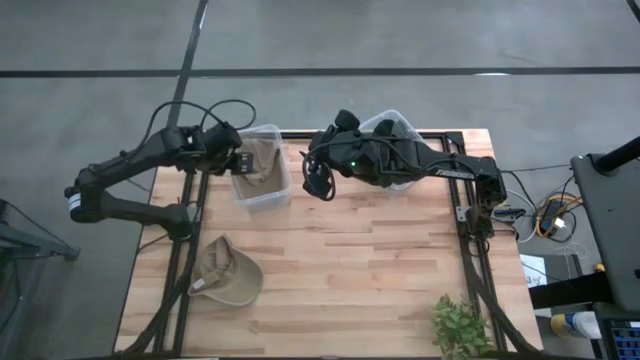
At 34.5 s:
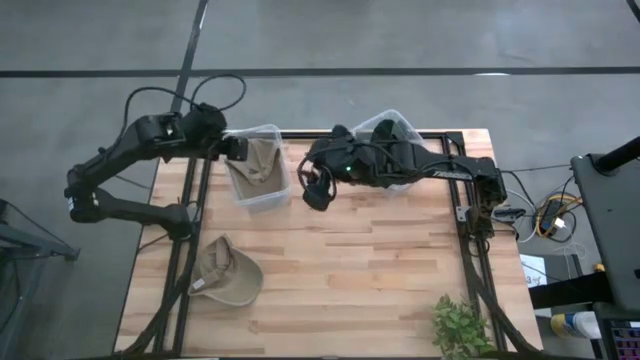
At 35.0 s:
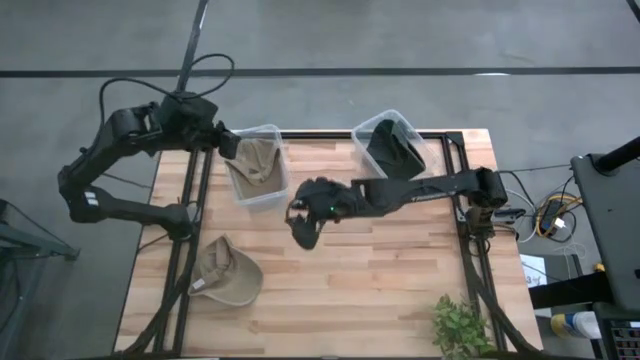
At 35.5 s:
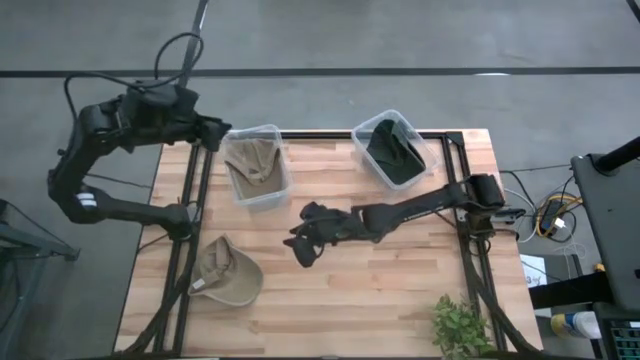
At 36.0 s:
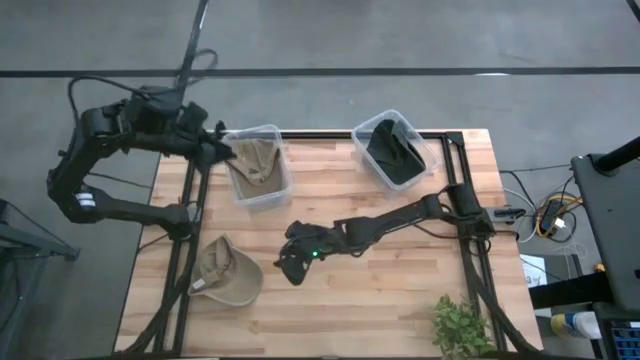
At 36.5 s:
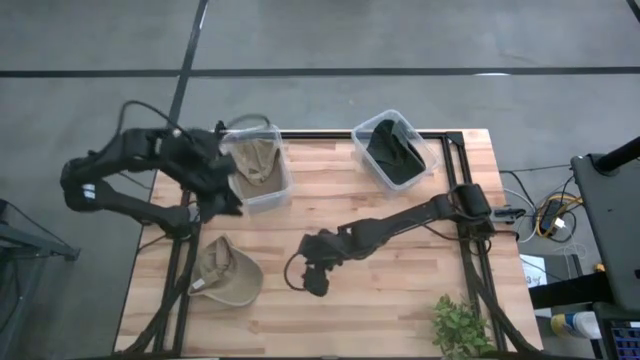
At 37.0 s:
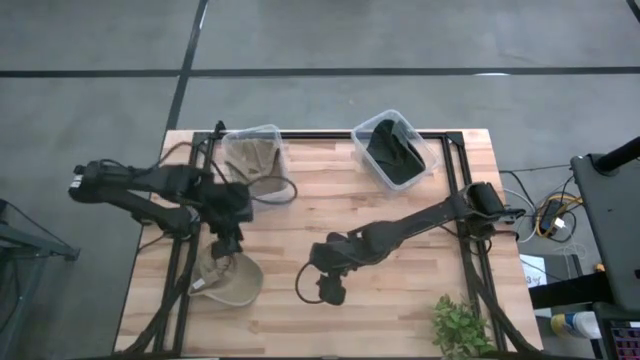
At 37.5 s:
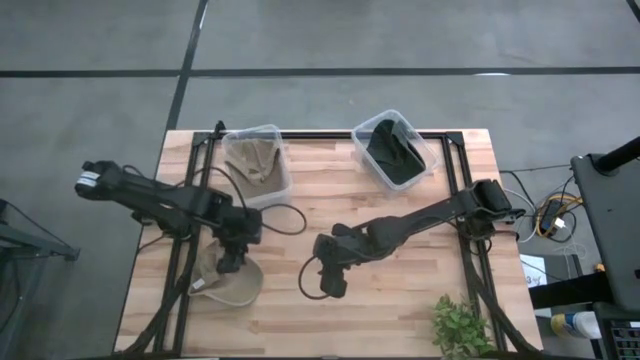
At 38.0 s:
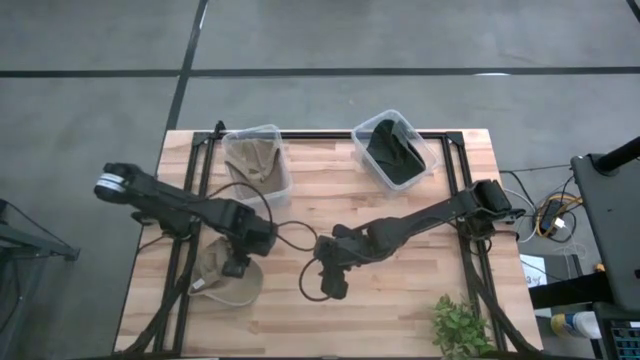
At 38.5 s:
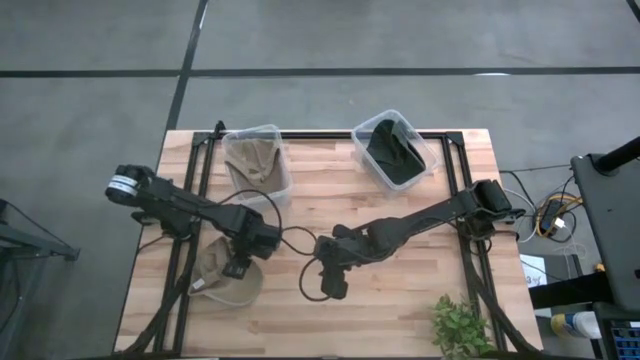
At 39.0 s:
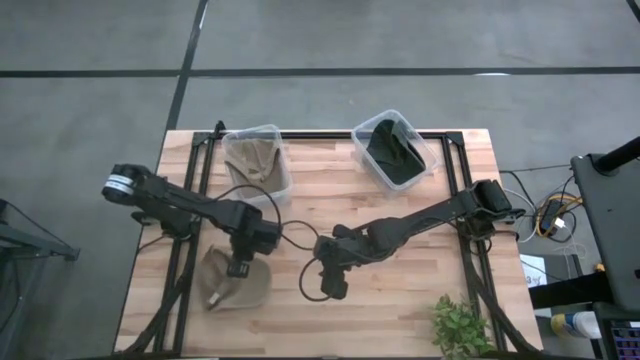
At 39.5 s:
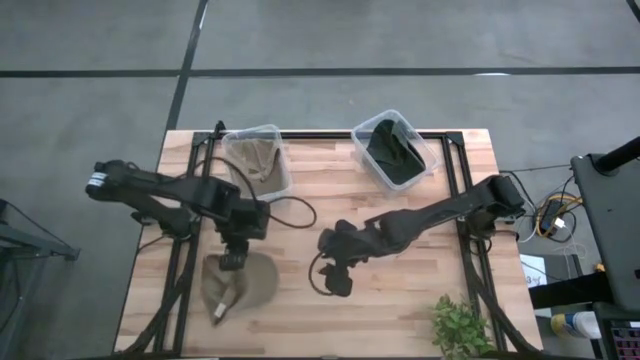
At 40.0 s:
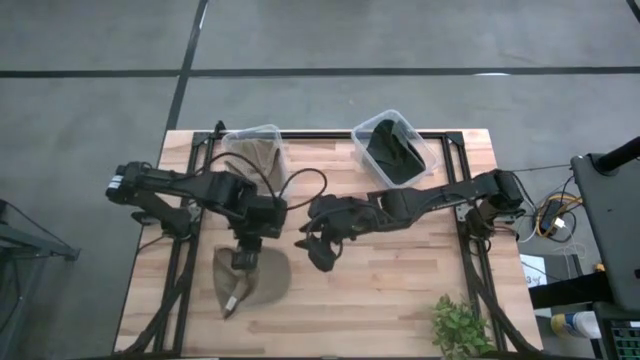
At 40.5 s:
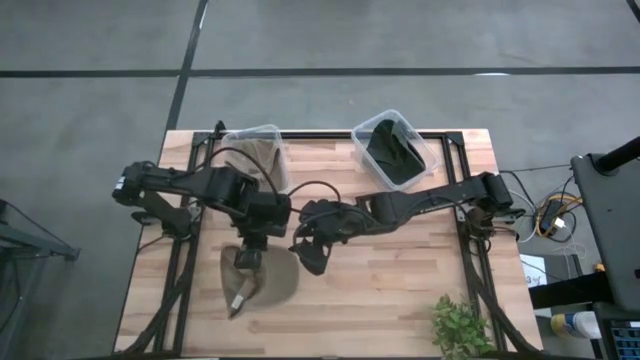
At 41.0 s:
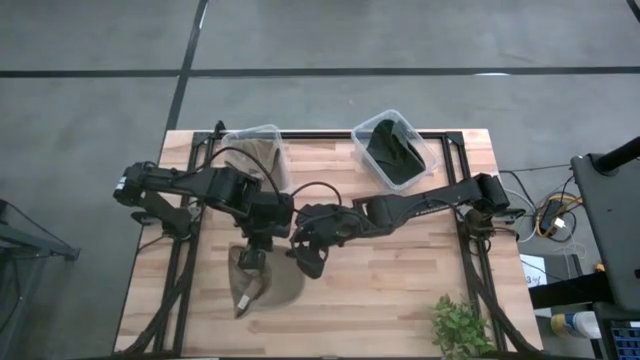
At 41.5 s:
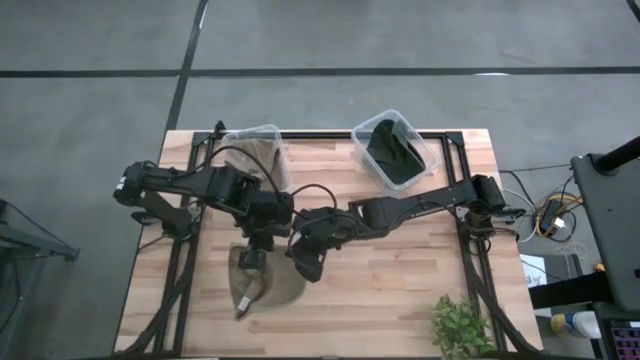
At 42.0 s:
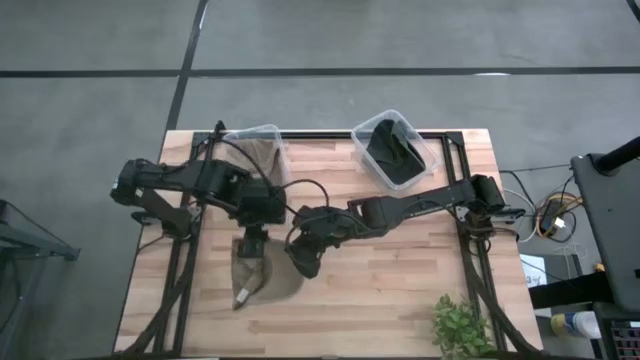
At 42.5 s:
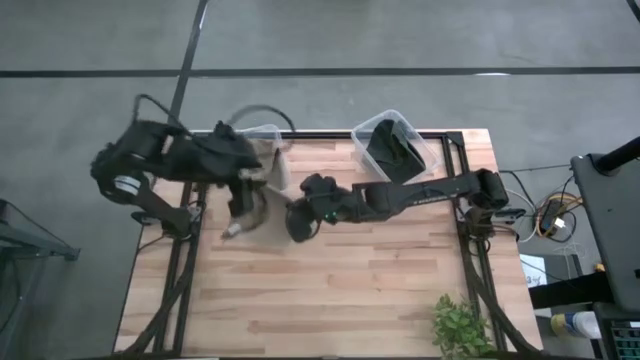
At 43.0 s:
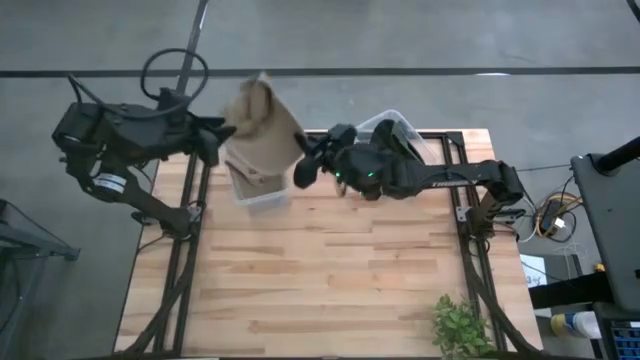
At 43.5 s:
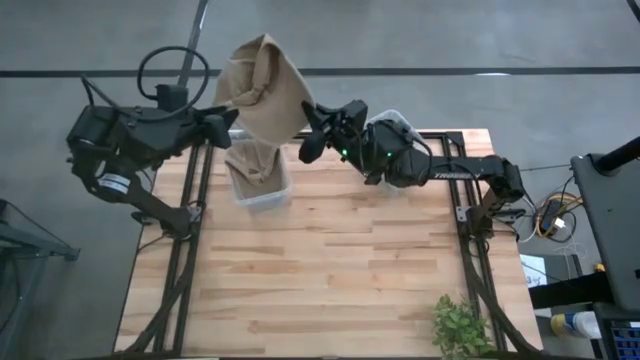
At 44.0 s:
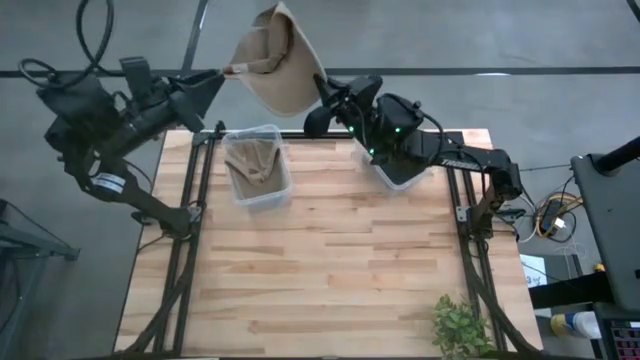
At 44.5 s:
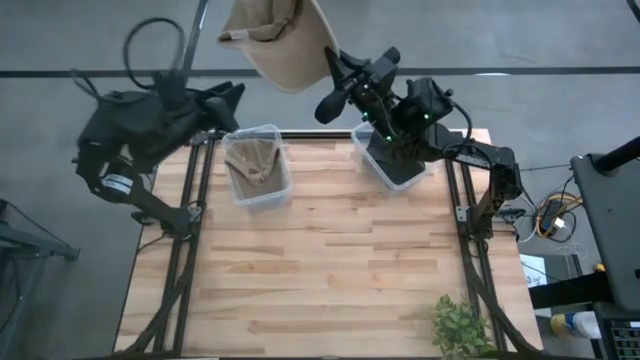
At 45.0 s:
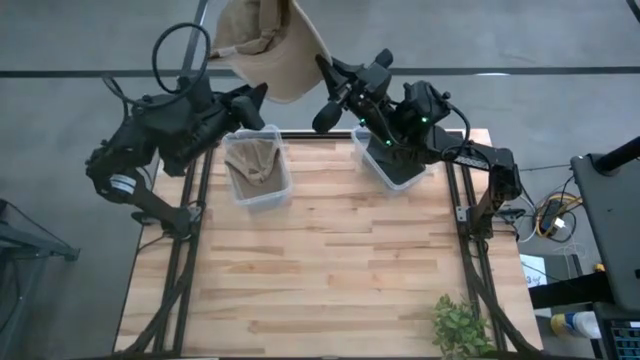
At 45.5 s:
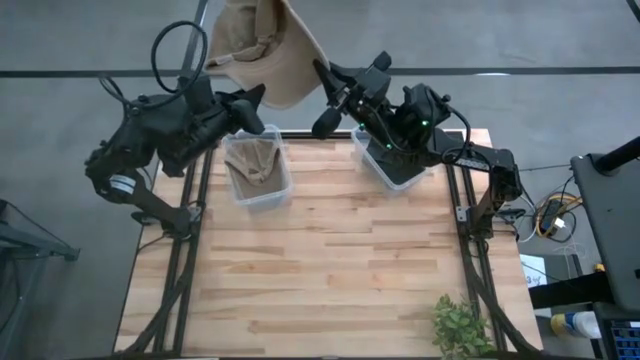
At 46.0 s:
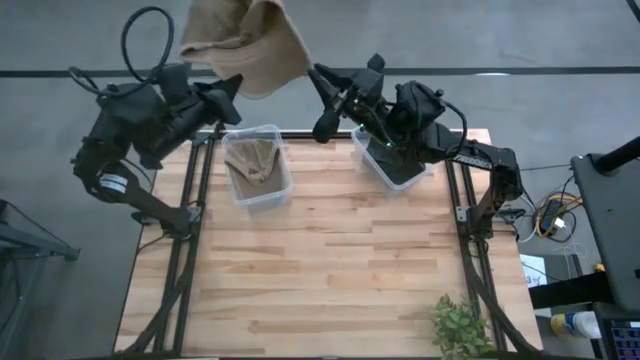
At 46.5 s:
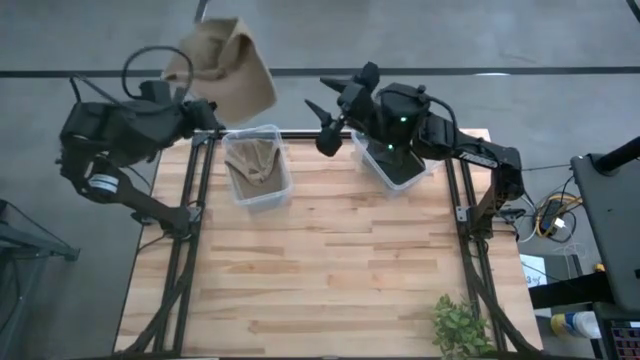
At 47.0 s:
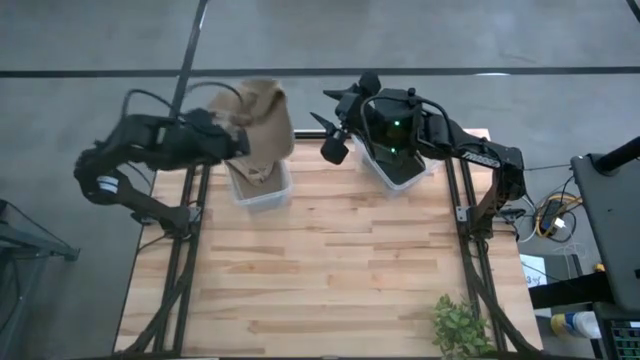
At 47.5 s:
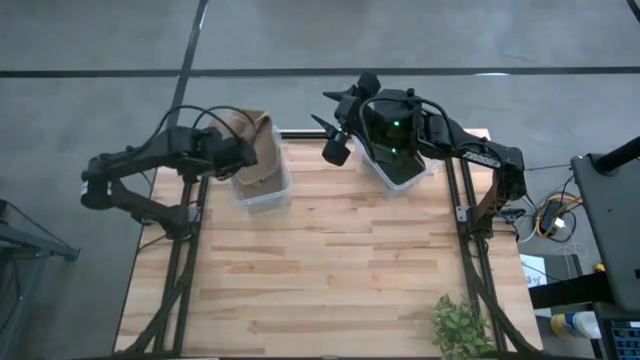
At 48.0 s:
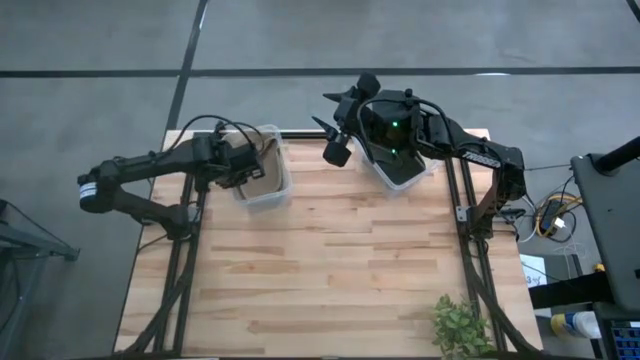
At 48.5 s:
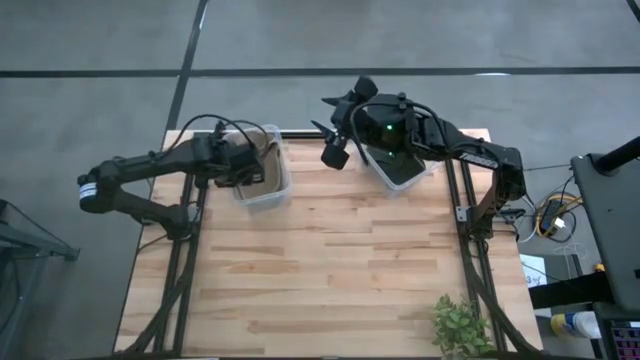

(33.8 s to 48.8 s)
Task: Pick & Place hat
Put the brown cap into the left transparent bin

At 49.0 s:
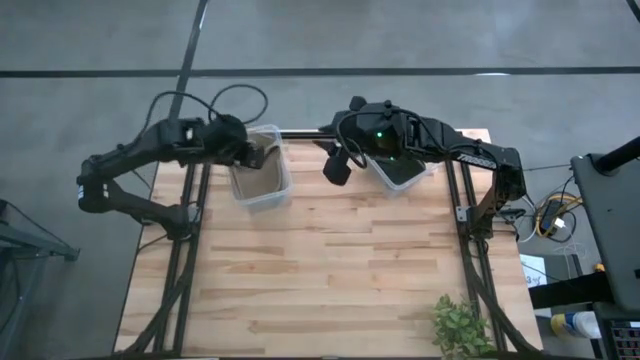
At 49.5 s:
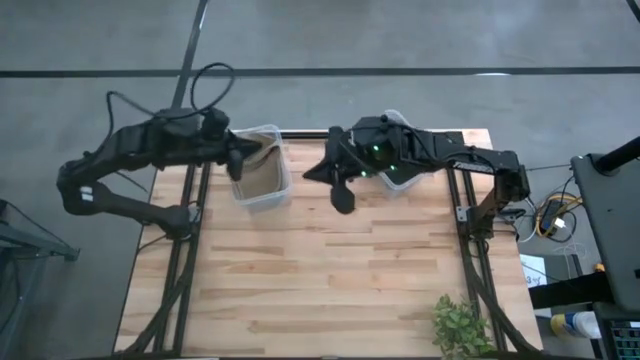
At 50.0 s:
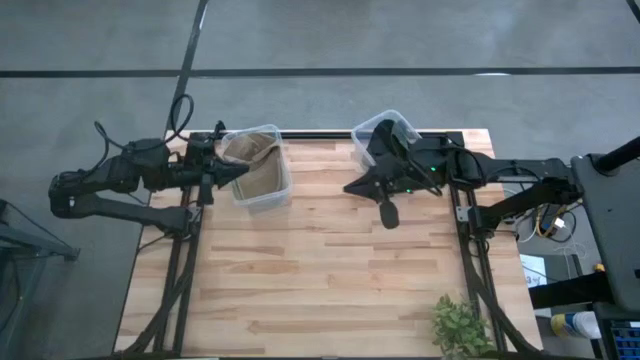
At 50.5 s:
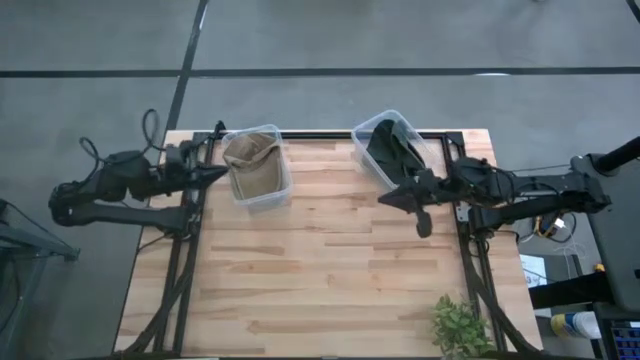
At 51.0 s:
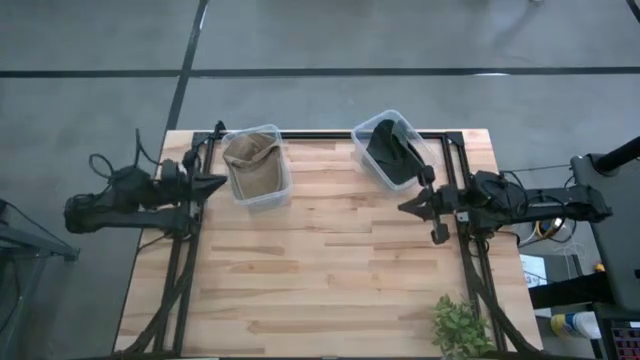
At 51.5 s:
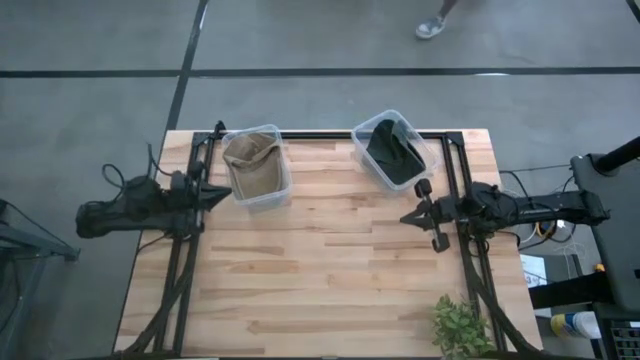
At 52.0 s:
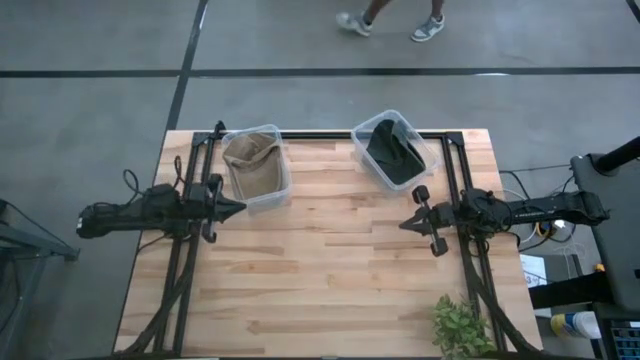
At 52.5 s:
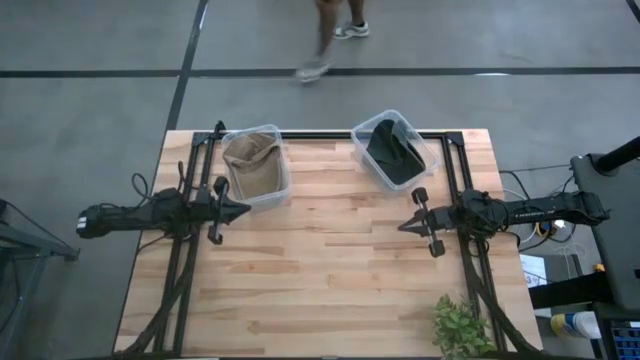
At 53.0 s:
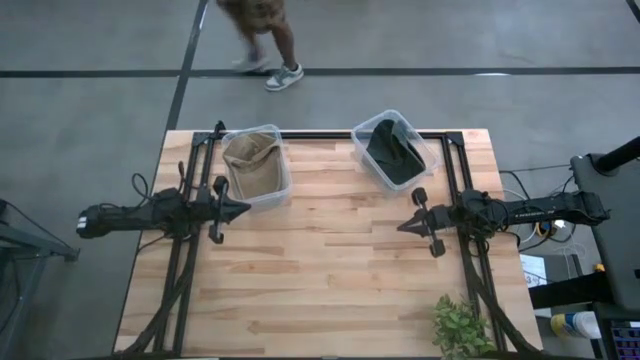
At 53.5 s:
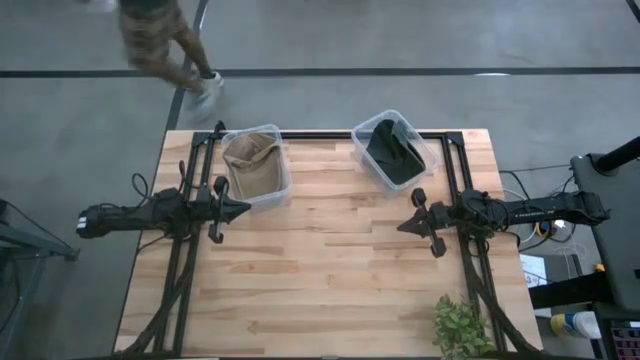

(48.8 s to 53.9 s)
Return to Home Position
